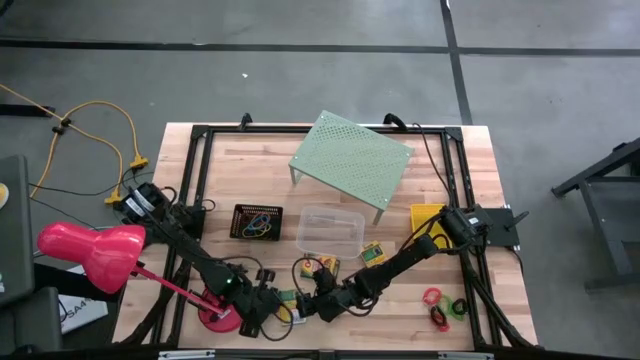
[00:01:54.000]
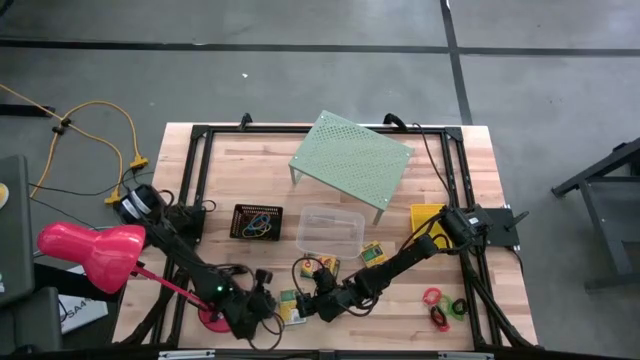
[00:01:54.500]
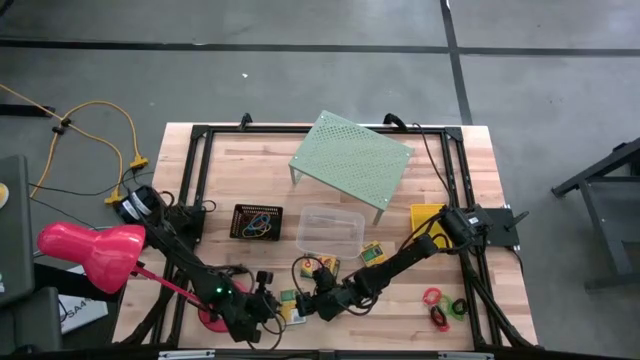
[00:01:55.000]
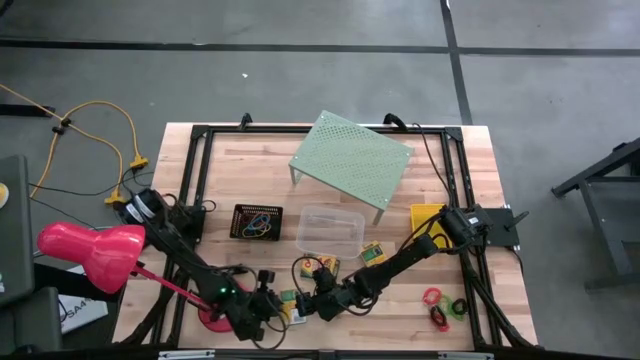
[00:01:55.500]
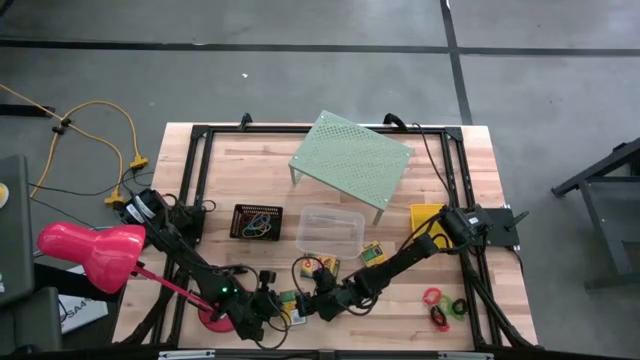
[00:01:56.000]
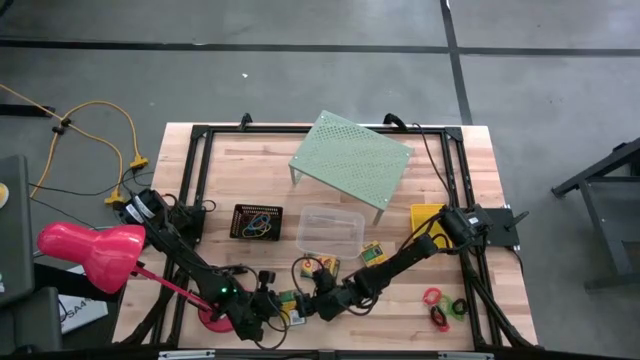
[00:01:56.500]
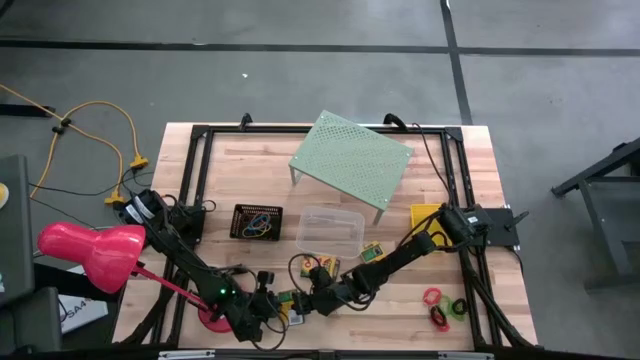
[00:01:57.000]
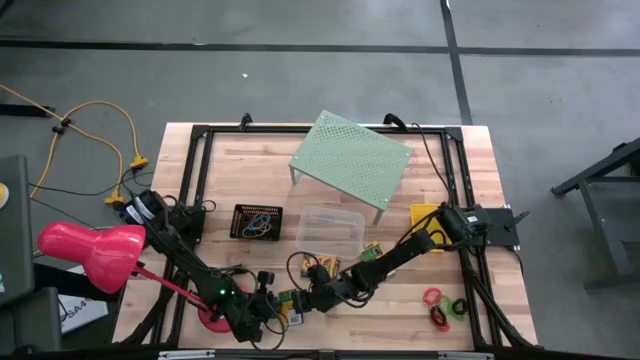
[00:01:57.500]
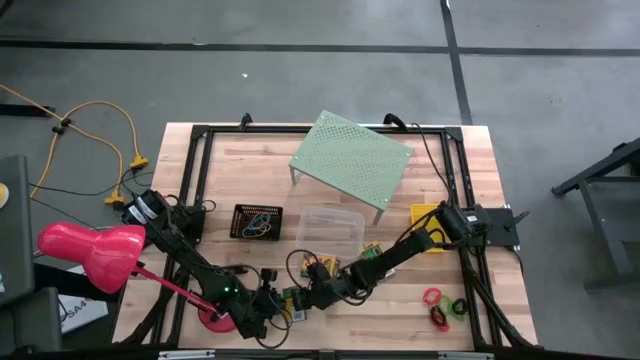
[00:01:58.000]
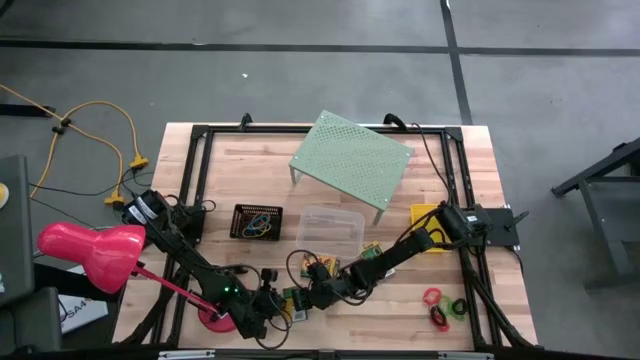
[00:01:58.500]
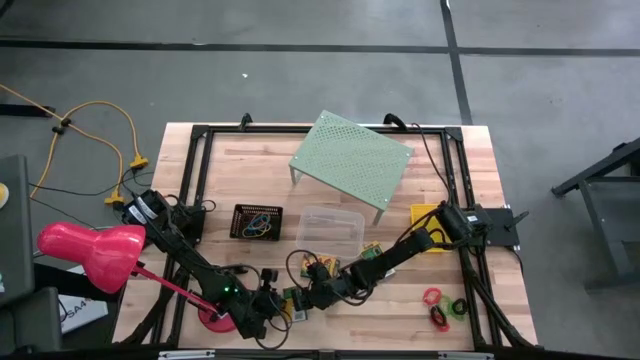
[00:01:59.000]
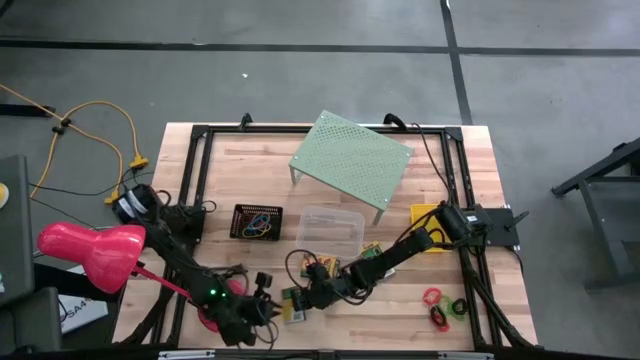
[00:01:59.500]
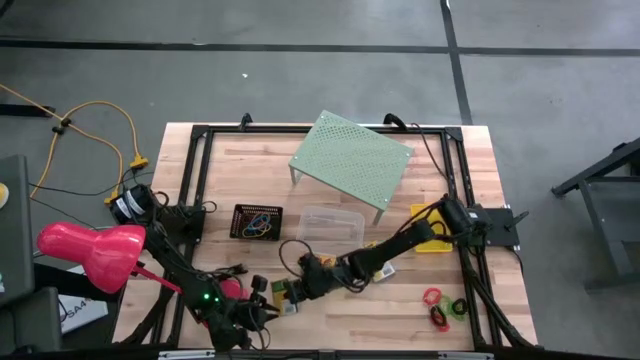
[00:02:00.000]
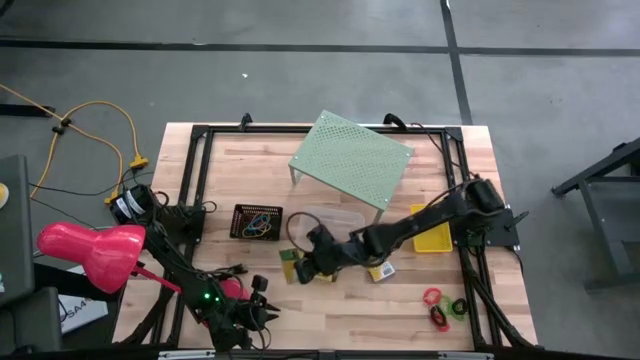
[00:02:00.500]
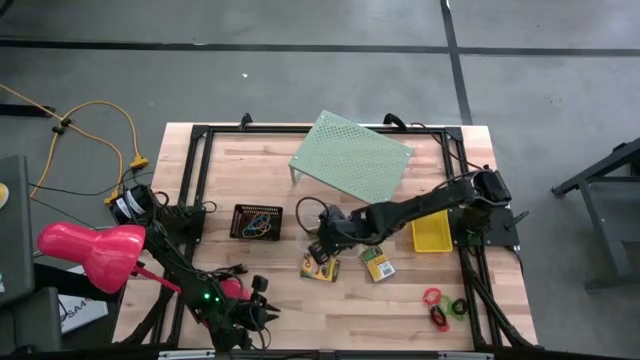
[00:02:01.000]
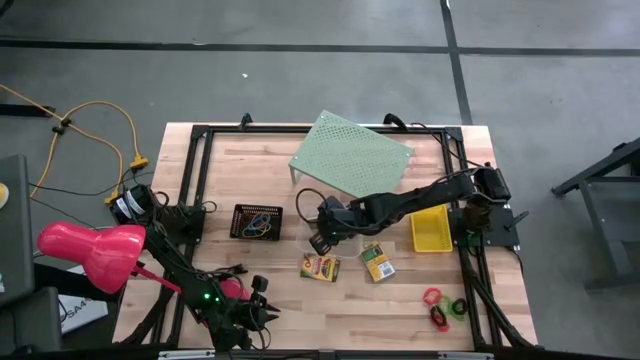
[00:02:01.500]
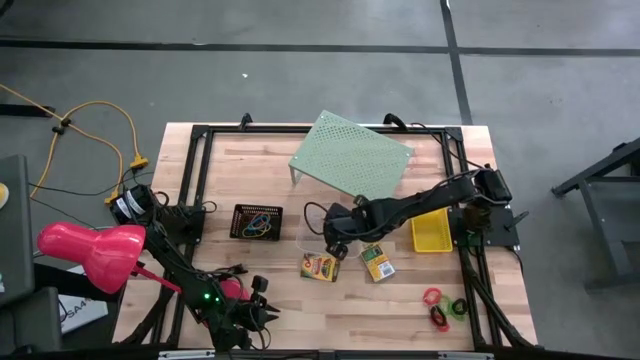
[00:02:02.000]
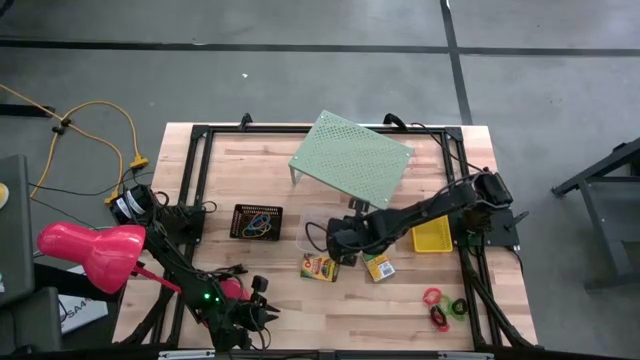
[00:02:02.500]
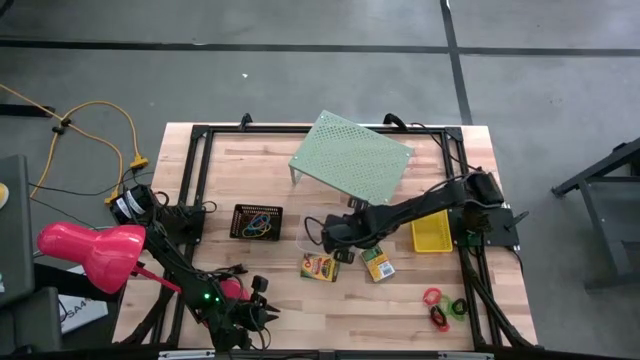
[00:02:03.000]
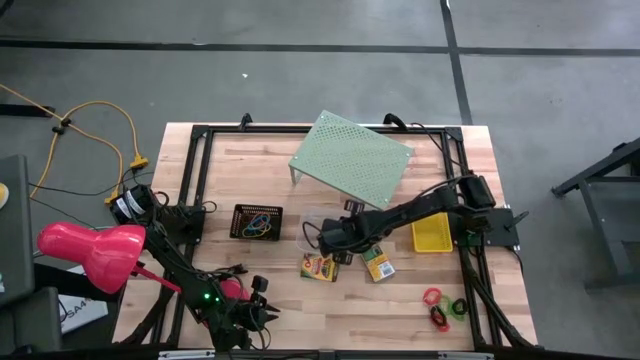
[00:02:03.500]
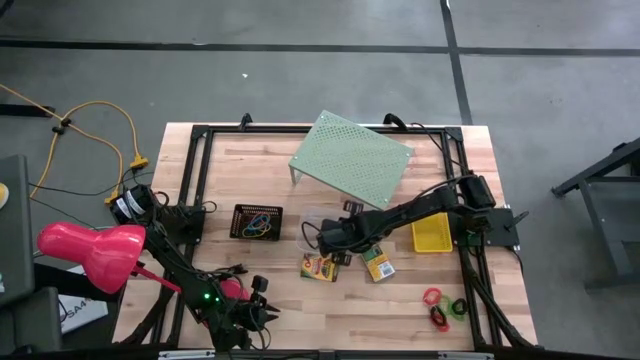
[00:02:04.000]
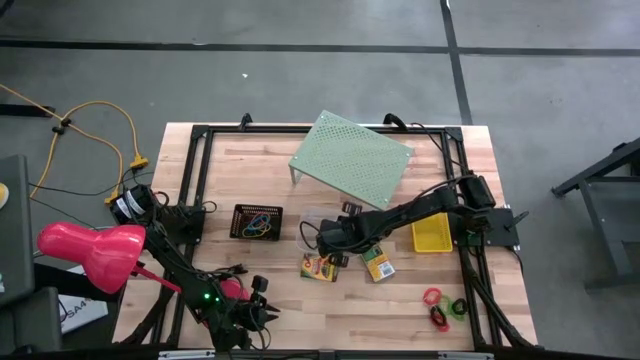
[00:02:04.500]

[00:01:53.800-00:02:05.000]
Task: Pick & Place Office Desk Supplies
Put the left yellow crayon box into the transparent bin

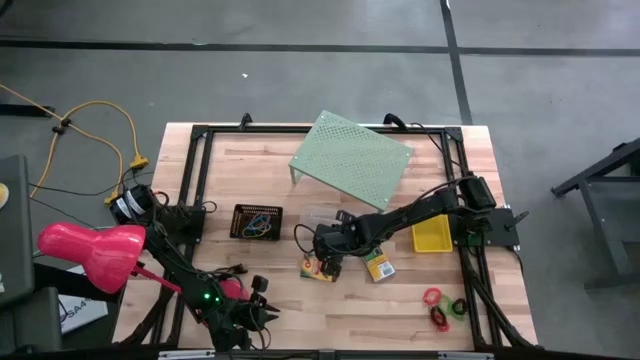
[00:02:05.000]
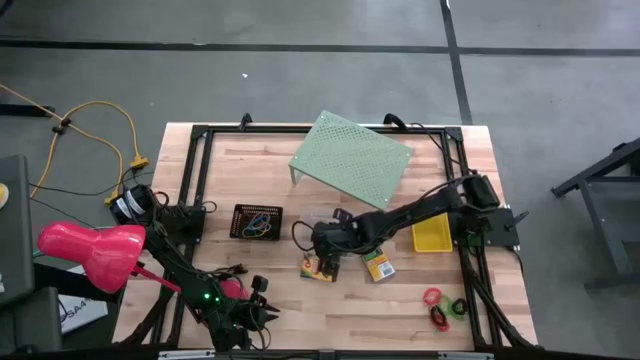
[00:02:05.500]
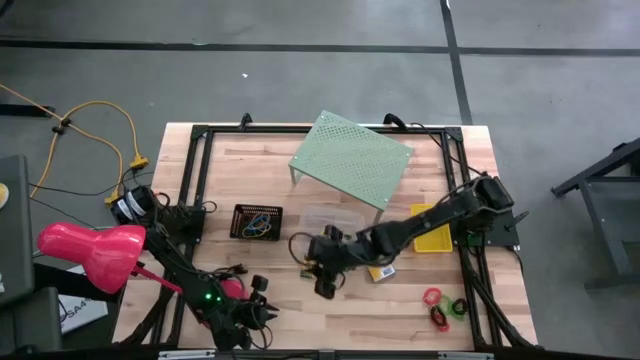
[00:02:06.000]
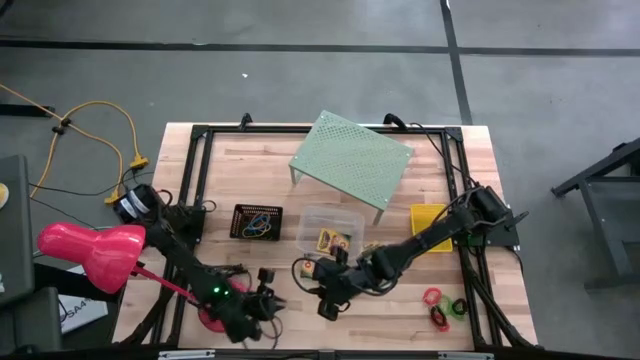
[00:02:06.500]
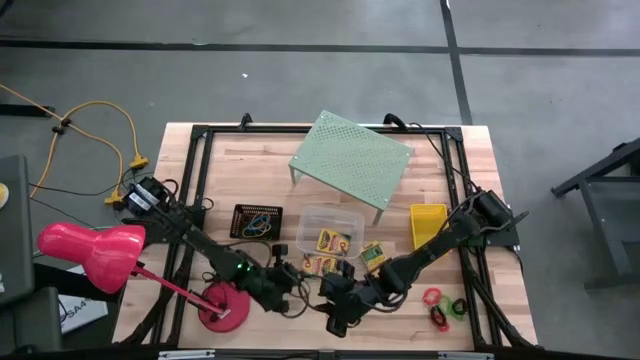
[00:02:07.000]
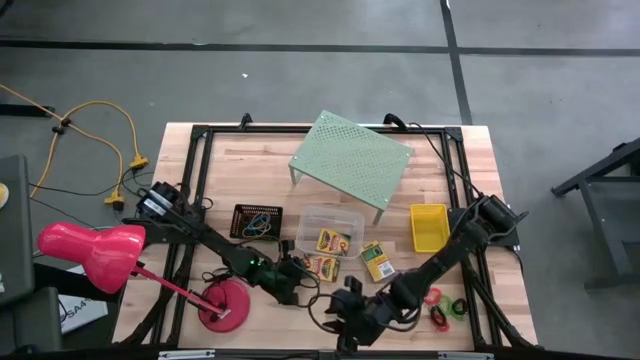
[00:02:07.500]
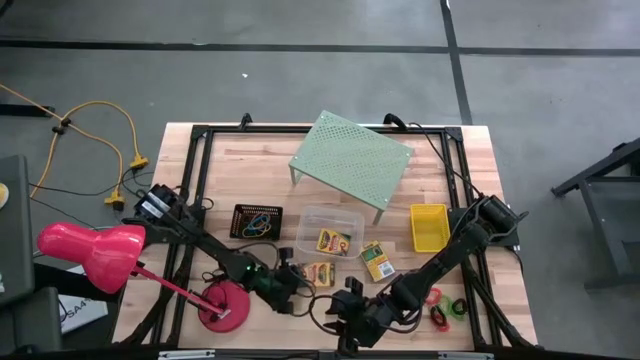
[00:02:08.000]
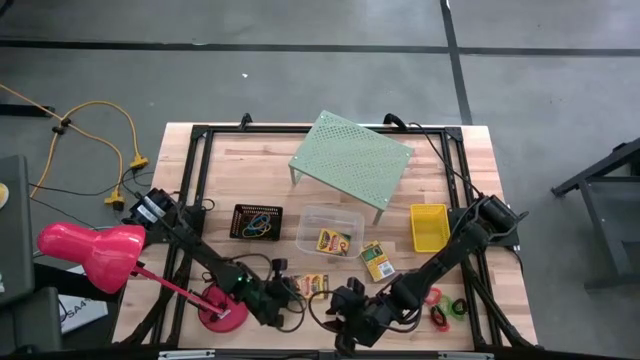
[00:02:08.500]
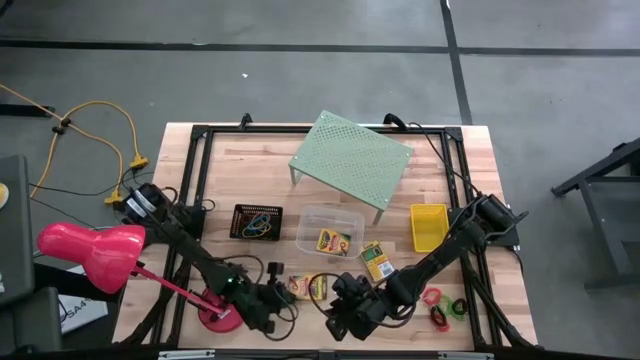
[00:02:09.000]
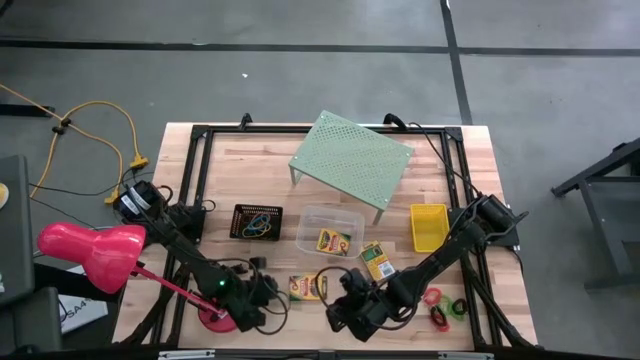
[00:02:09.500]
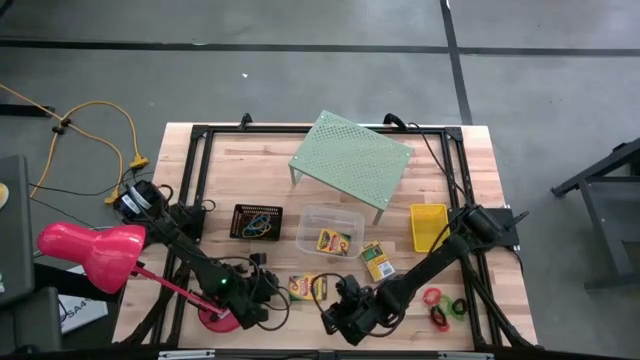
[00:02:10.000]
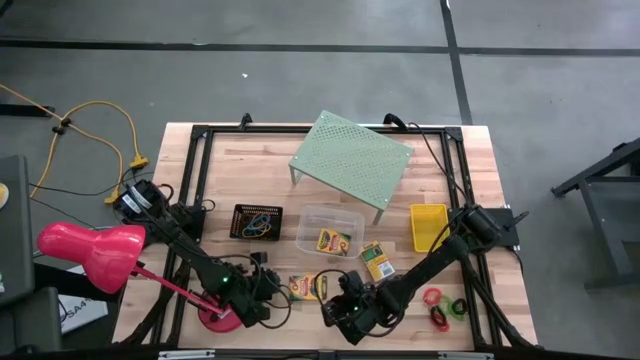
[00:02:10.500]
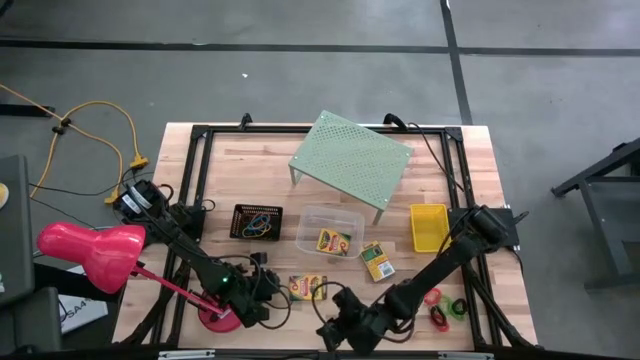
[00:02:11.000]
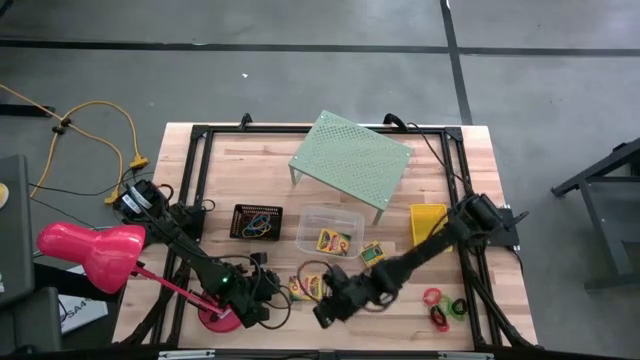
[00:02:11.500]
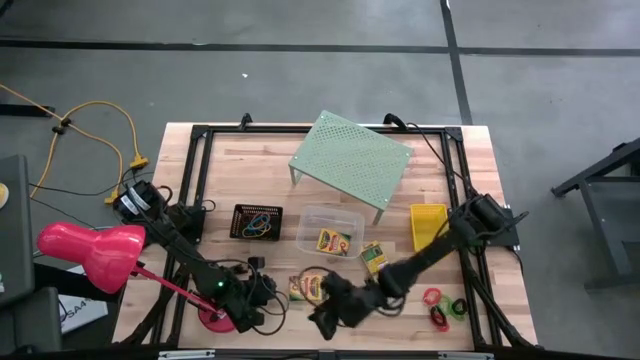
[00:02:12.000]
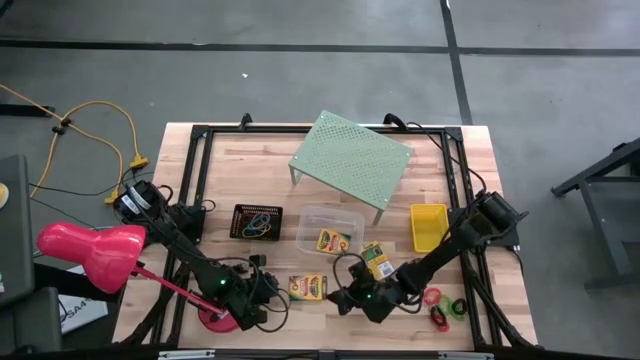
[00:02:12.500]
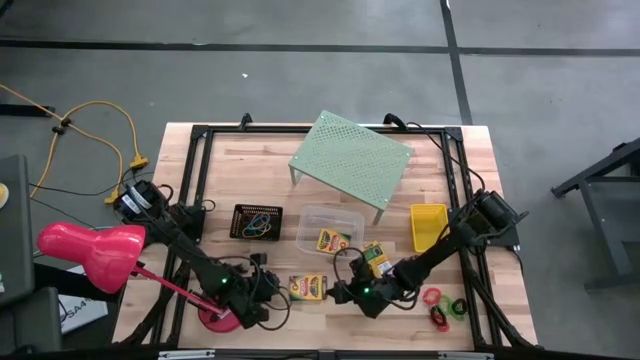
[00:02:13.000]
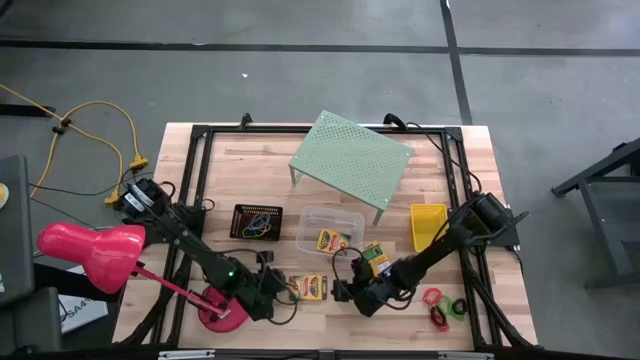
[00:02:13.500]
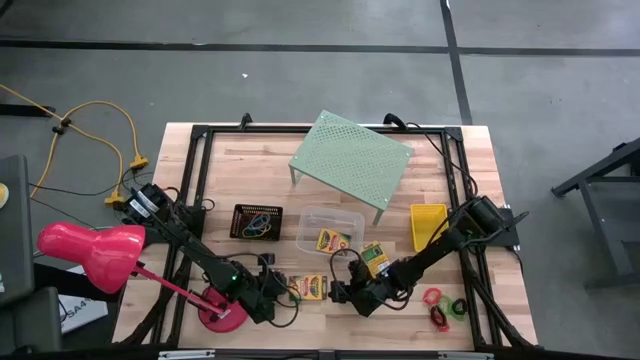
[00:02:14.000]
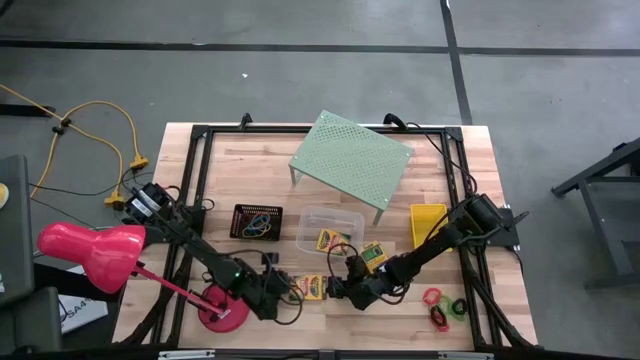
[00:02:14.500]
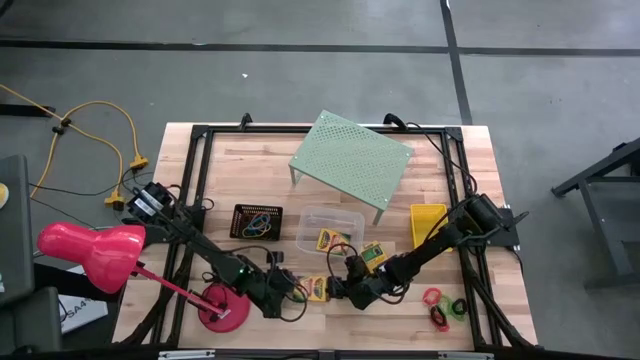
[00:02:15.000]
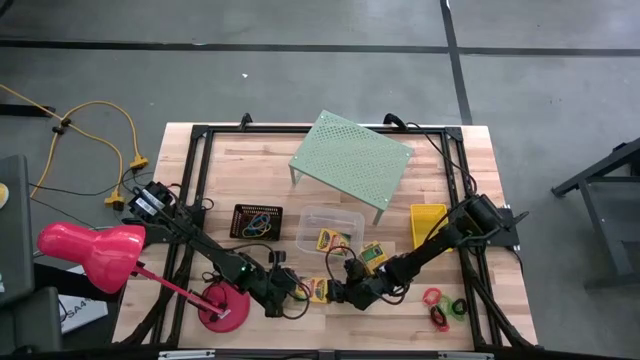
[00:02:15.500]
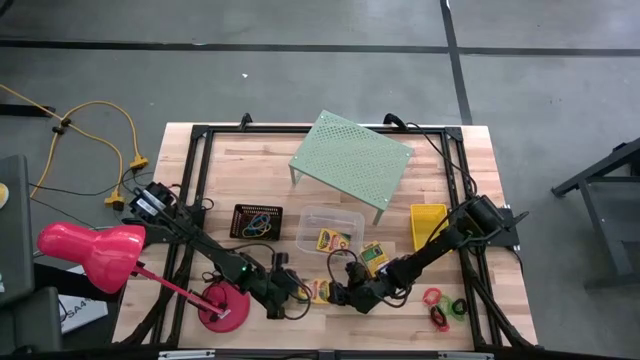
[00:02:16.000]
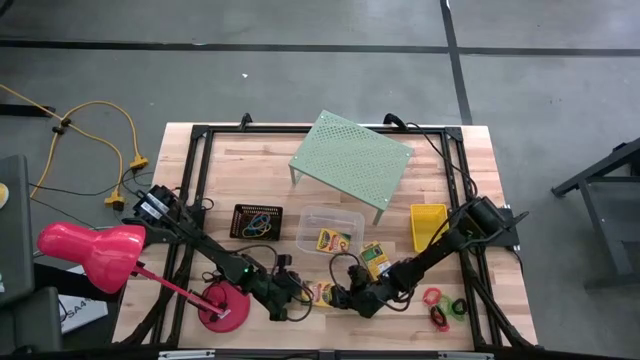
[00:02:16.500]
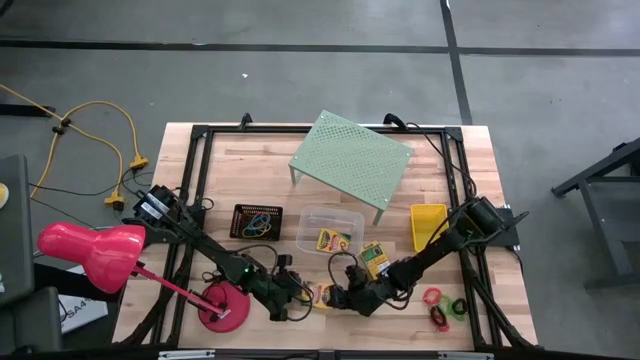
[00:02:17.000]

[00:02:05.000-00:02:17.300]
Put the left yellow crayon box into the transparent bin
